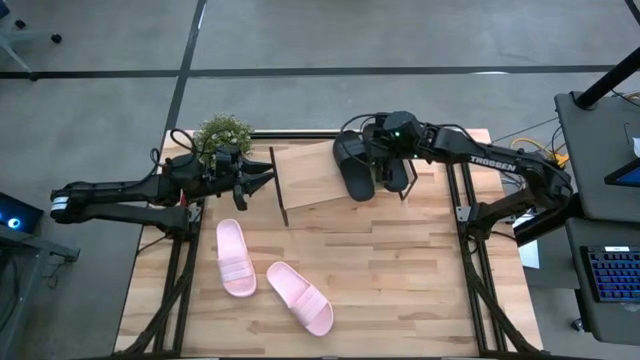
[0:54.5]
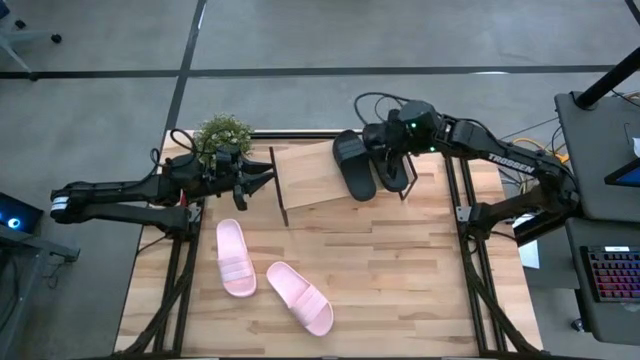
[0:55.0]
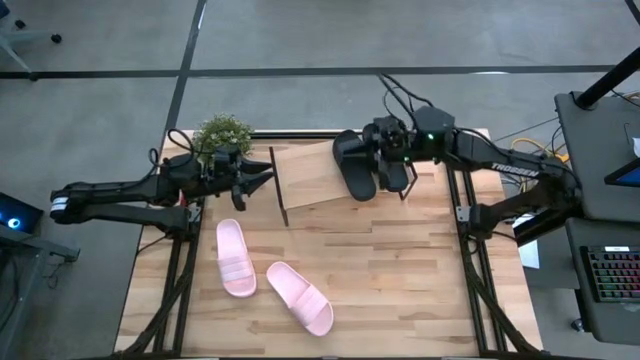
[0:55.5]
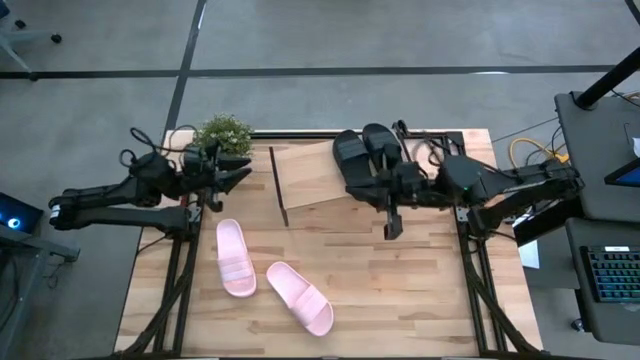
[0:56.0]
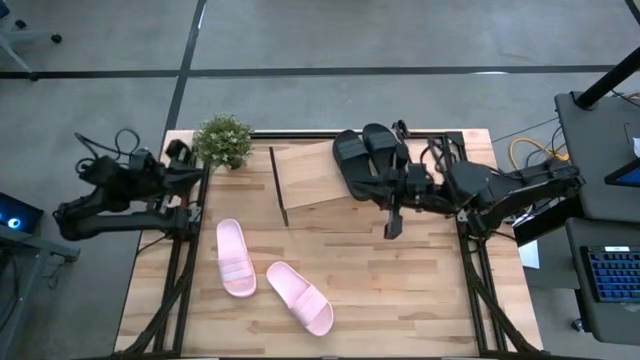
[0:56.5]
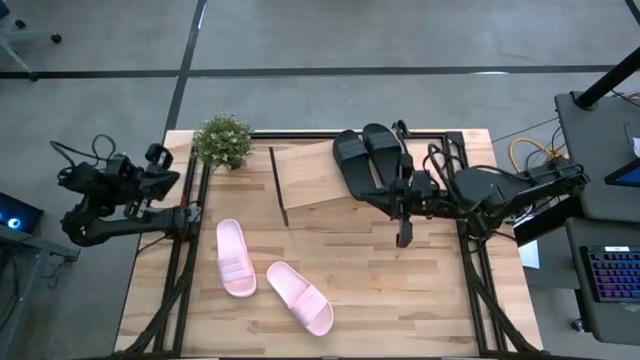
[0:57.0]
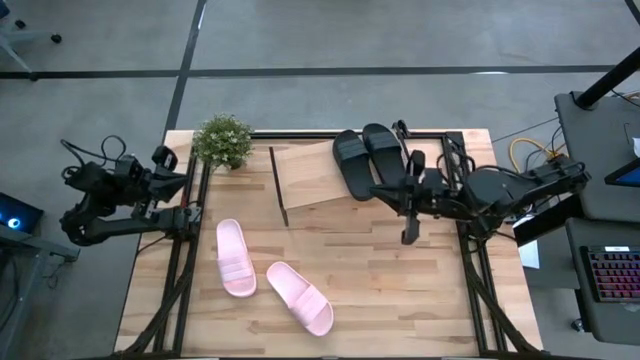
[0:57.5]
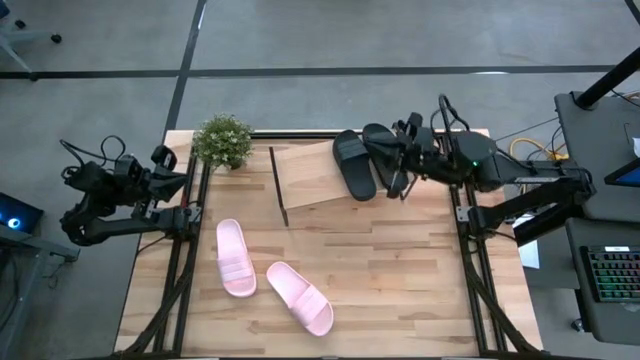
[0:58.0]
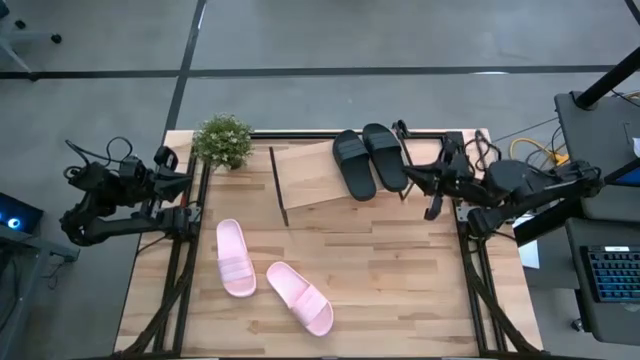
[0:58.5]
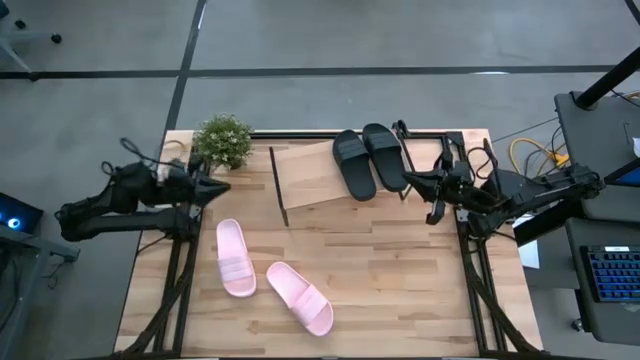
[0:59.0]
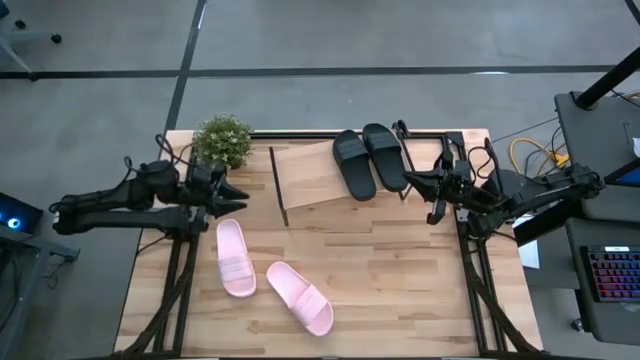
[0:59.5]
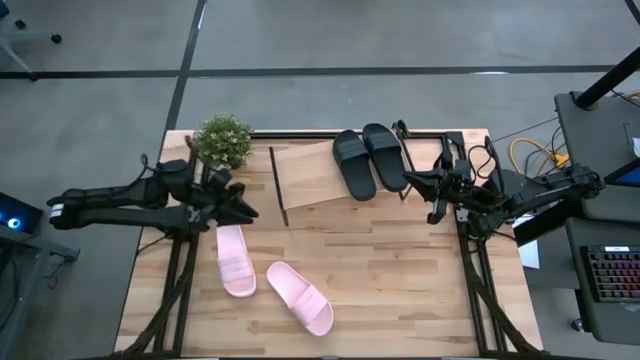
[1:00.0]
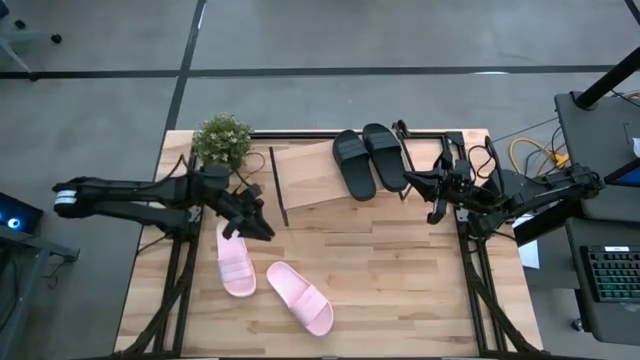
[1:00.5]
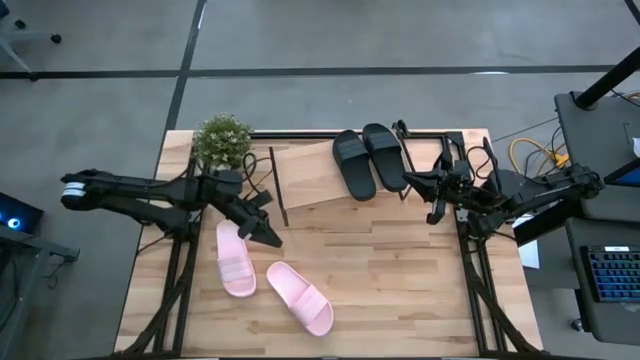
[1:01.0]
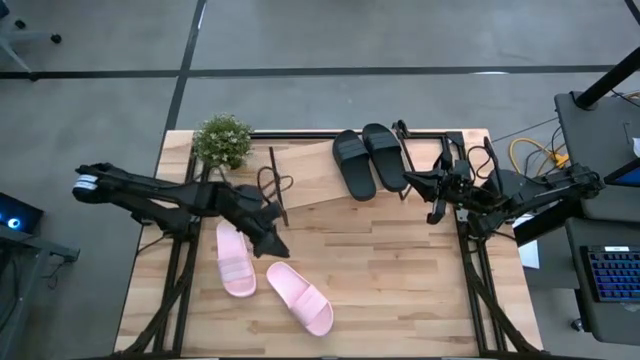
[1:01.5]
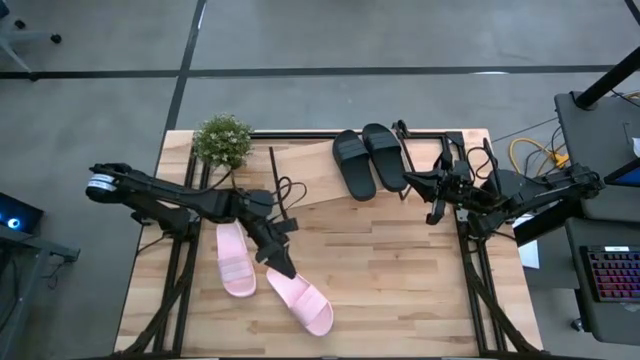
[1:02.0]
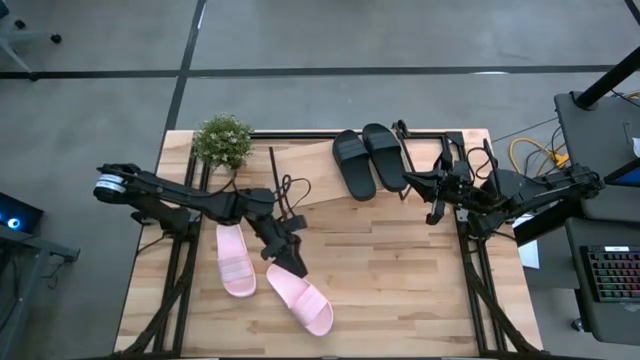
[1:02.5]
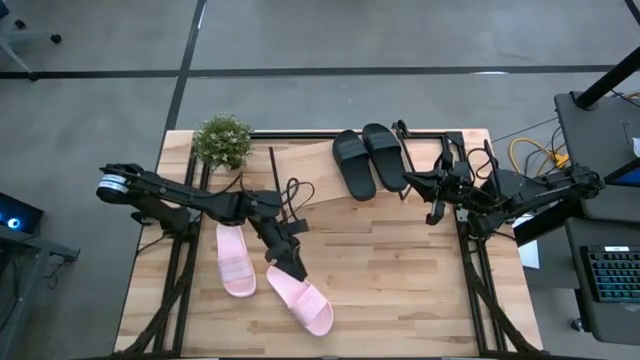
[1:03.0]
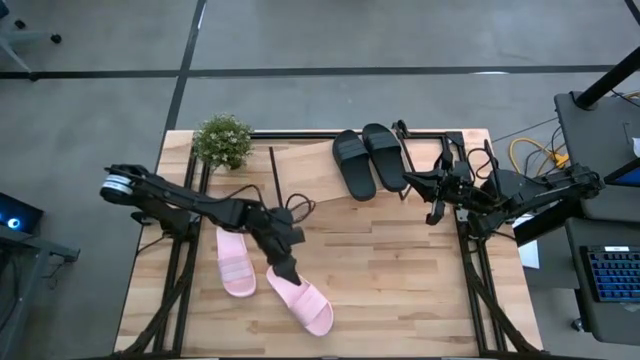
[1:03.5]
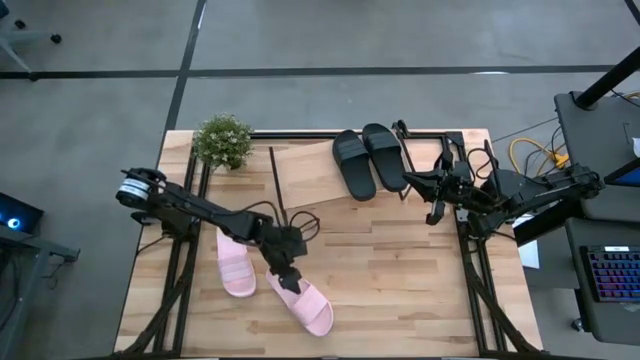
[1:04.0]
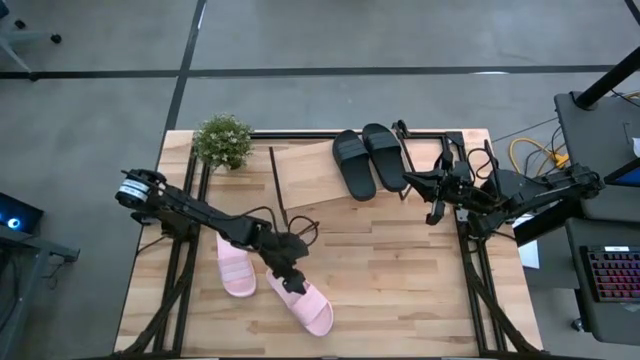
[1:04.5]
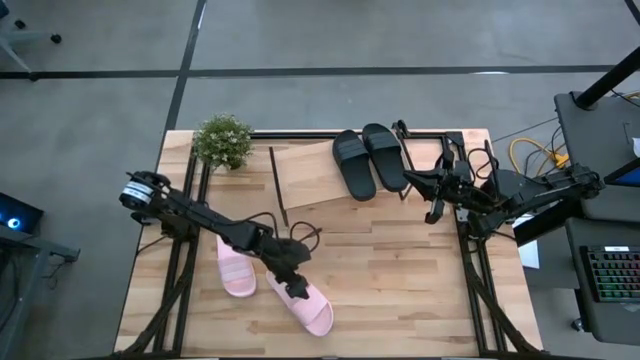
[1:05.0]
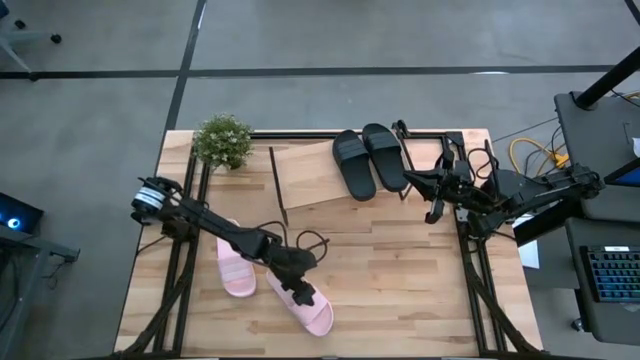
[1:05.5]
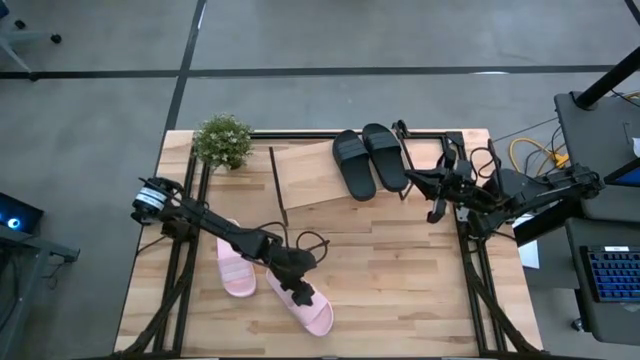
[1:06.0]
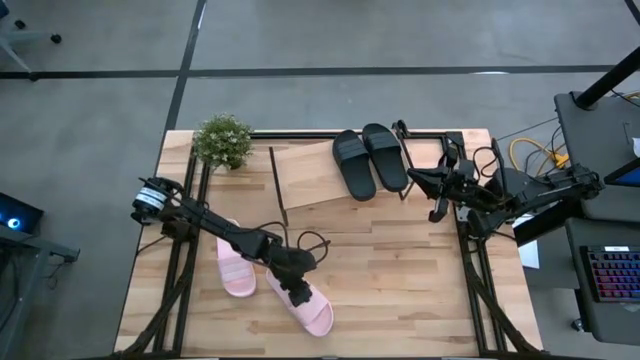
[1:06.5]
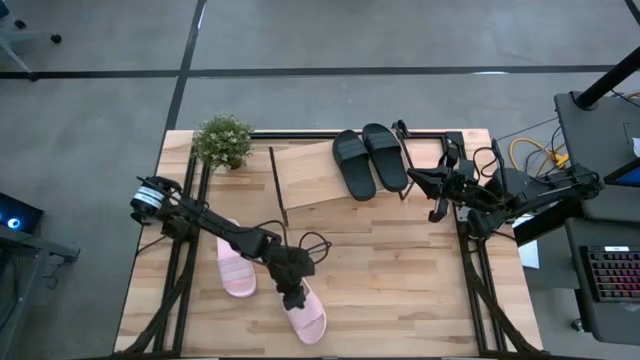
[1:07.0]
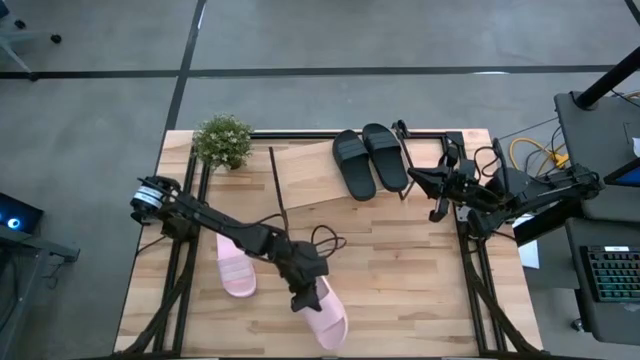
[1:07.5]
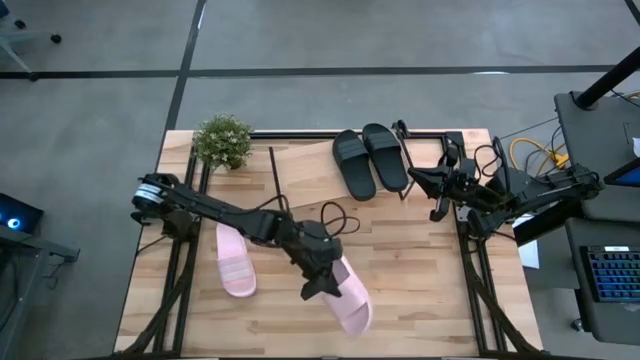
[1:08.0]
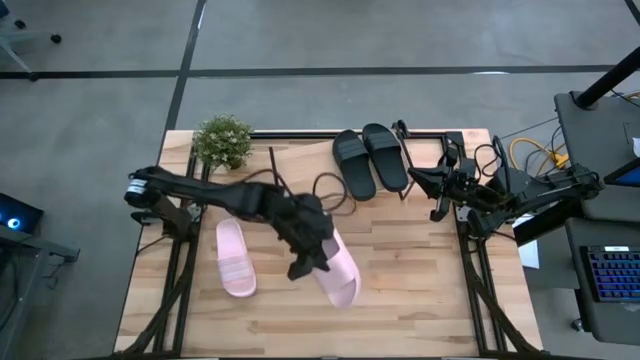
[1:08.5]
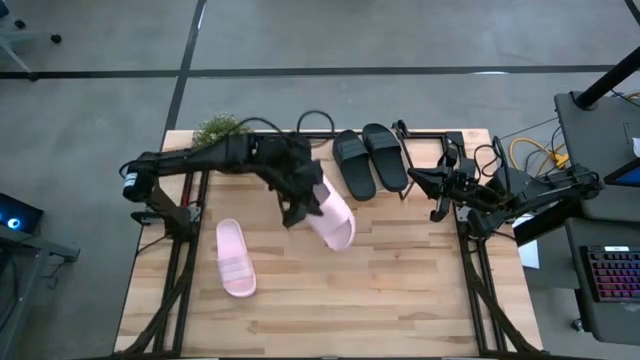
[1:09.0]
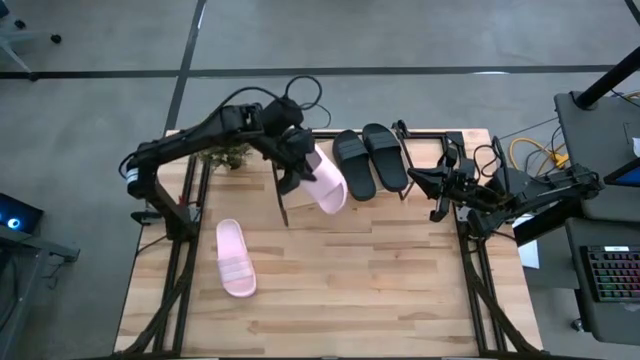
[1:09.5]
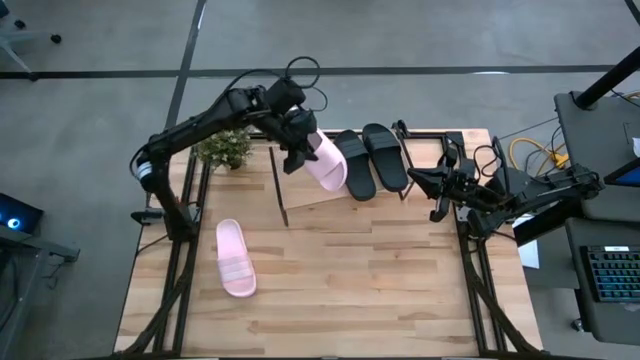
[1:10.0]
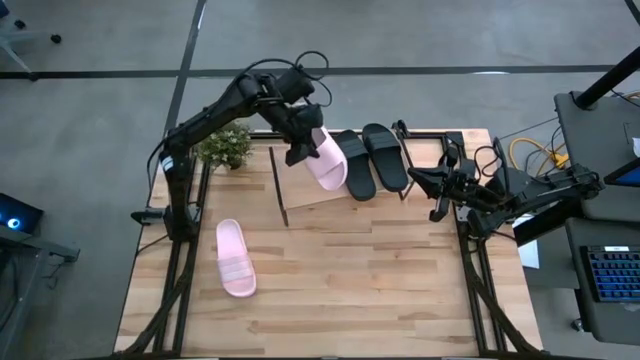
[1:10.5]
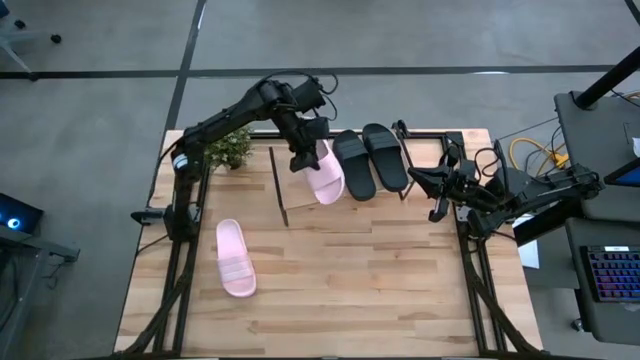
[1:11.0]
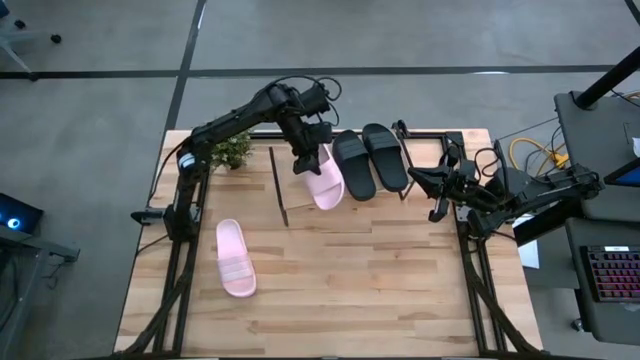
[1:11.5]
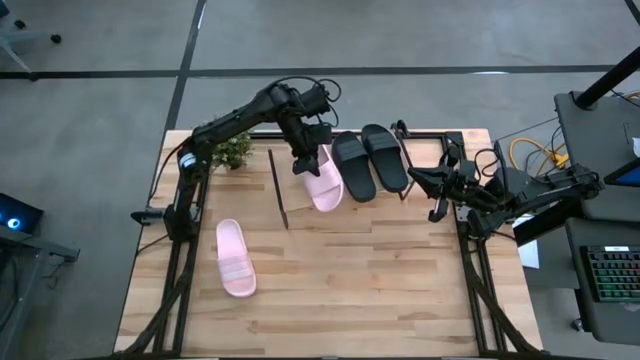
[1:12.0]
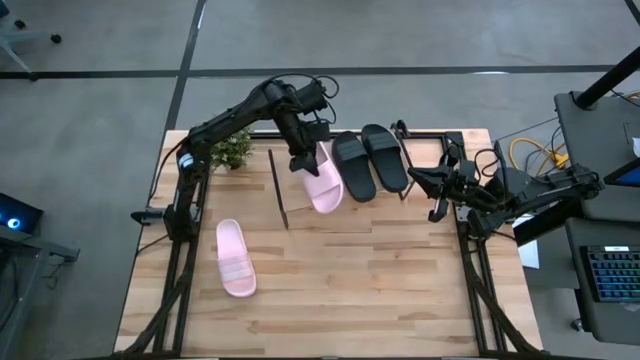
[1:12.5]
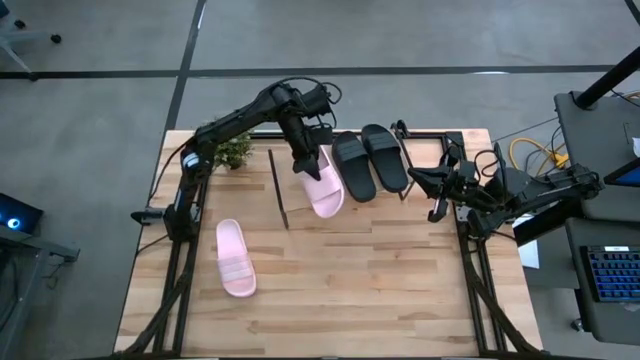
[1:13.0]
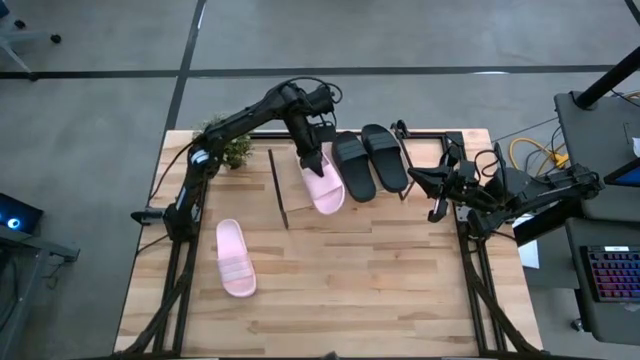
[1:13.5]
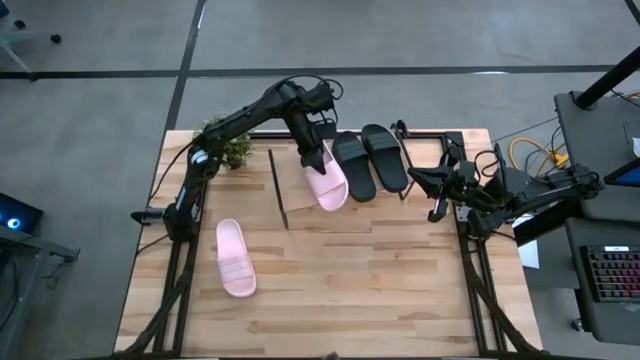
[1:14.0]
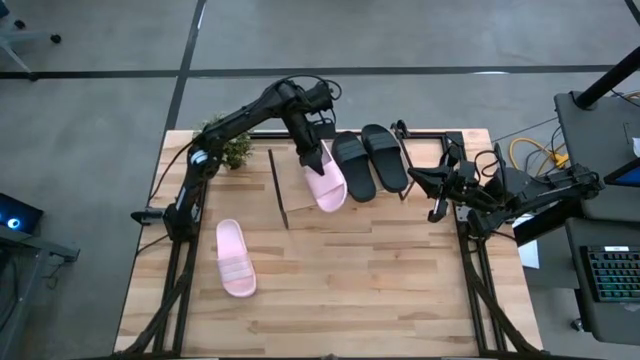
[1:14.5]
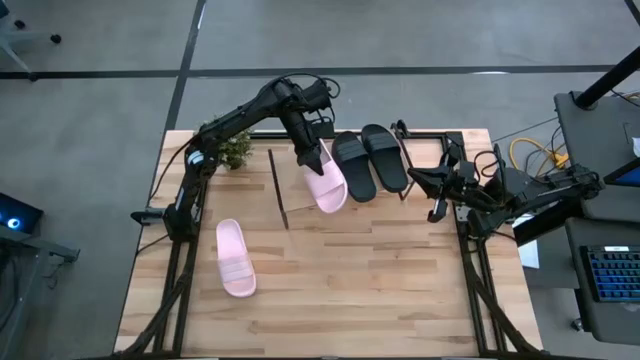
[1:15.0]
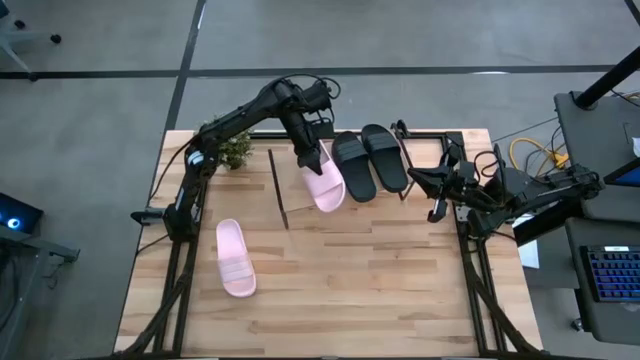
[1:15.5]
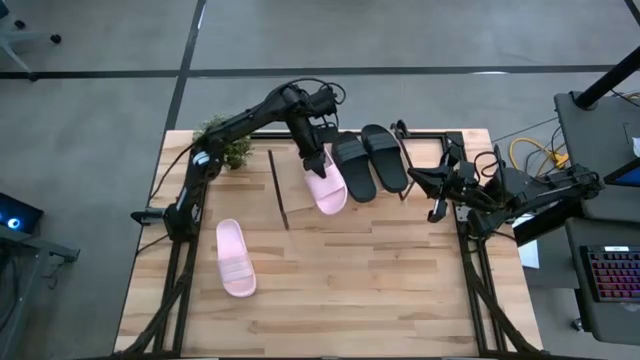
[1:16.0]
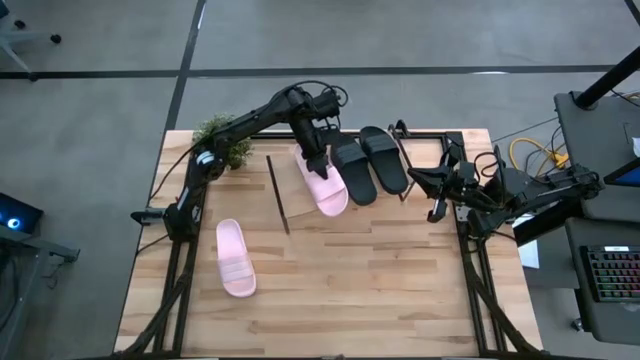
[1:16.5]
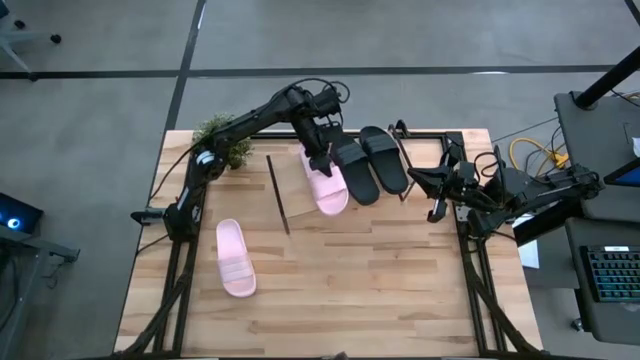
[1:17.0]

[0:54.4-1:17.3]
Task: Pick and place slides into the shelf
Put the bottom pink slipper on the shelf
